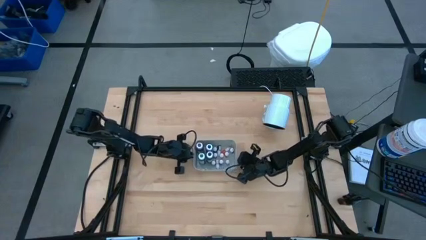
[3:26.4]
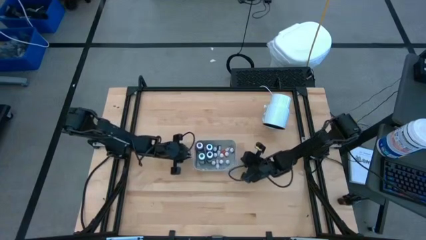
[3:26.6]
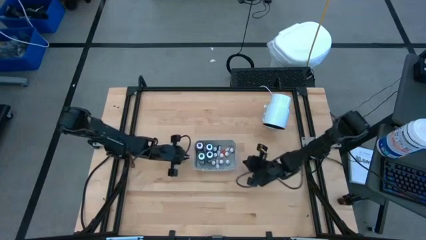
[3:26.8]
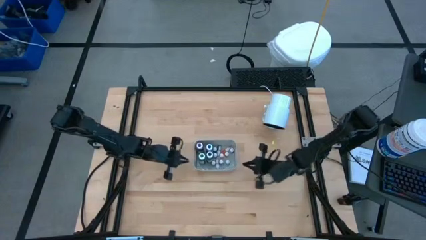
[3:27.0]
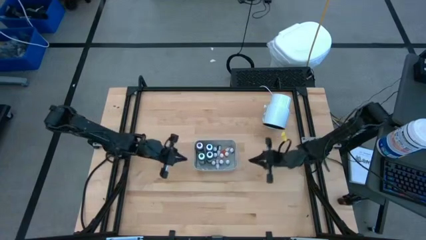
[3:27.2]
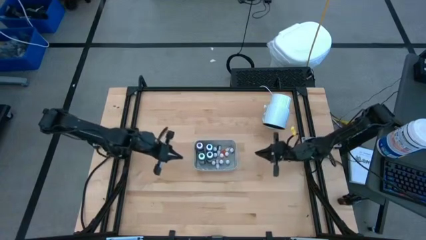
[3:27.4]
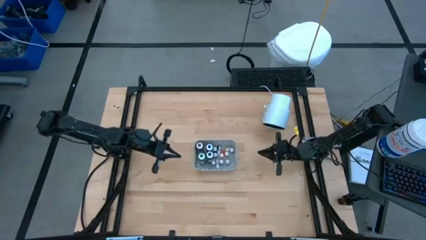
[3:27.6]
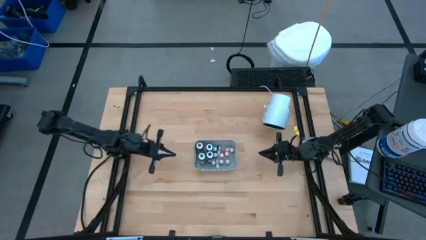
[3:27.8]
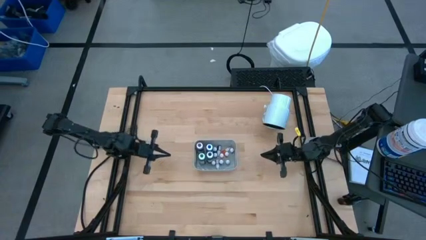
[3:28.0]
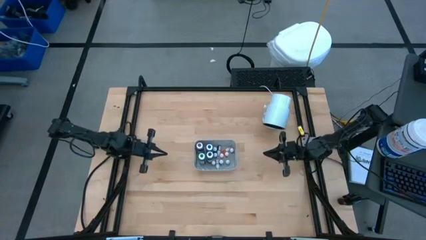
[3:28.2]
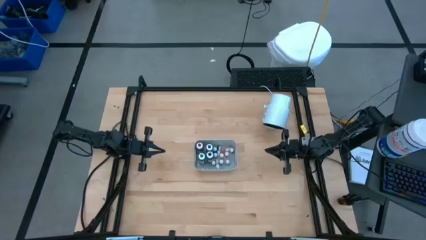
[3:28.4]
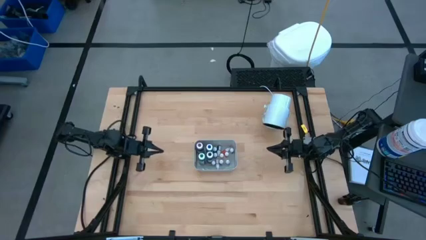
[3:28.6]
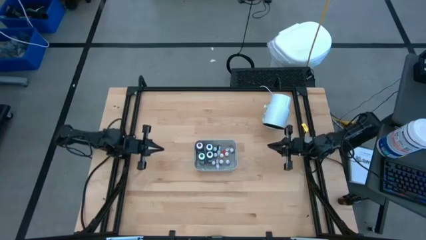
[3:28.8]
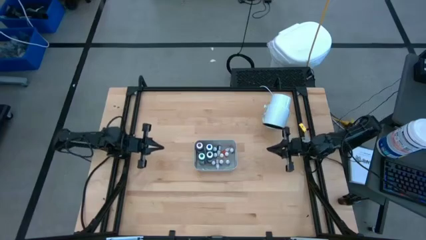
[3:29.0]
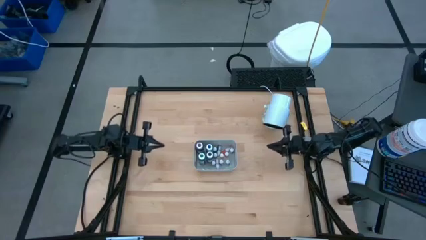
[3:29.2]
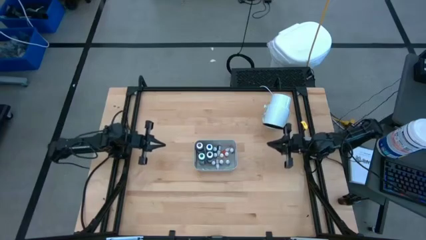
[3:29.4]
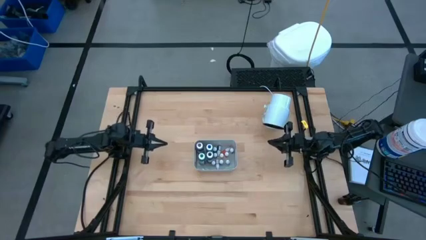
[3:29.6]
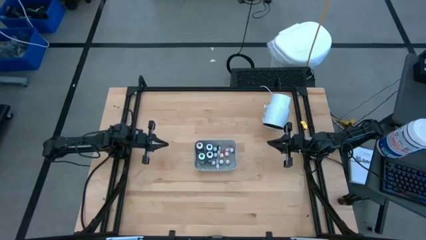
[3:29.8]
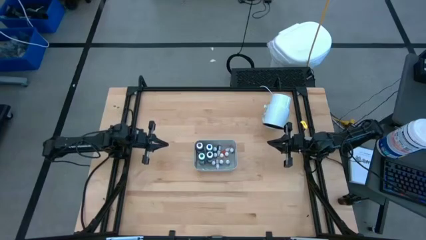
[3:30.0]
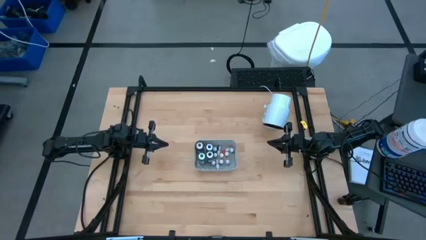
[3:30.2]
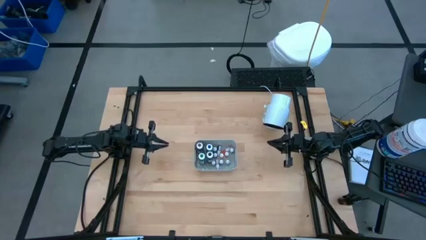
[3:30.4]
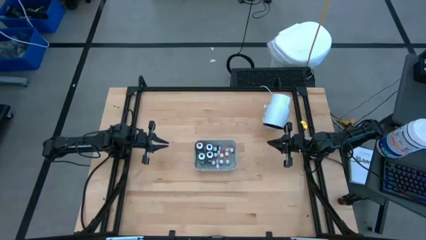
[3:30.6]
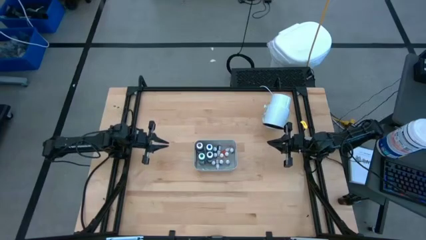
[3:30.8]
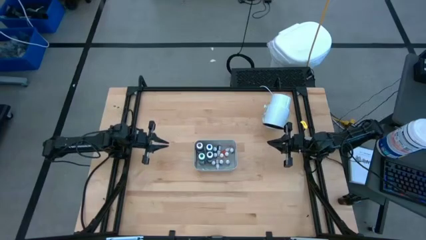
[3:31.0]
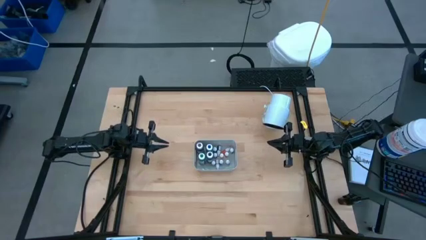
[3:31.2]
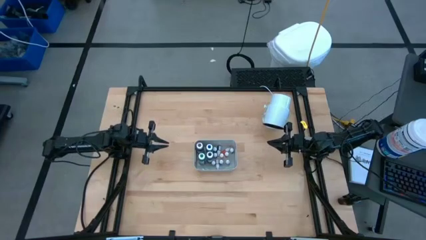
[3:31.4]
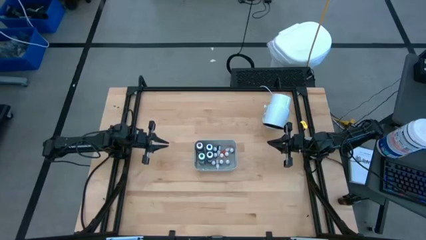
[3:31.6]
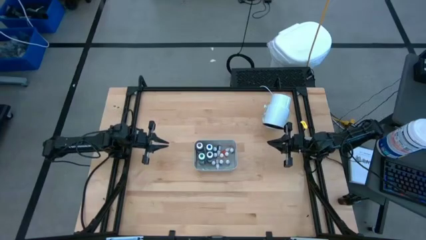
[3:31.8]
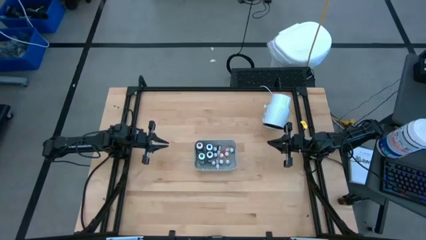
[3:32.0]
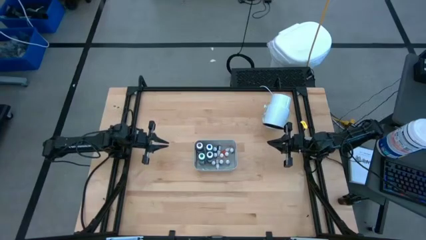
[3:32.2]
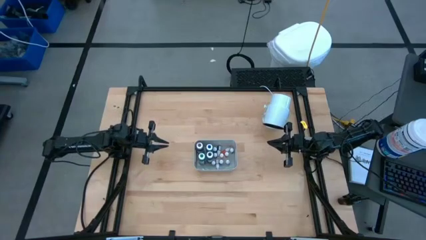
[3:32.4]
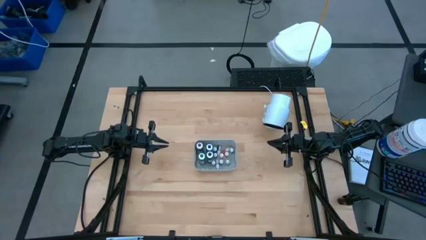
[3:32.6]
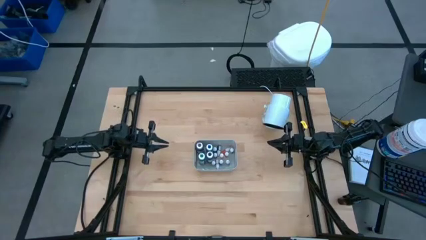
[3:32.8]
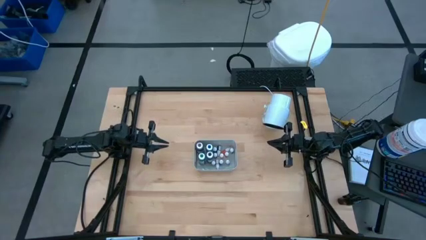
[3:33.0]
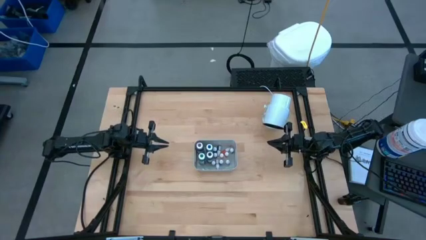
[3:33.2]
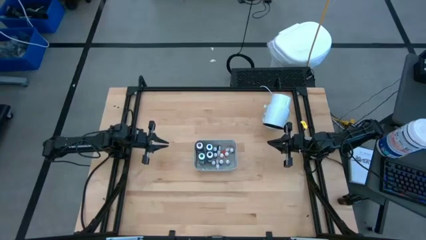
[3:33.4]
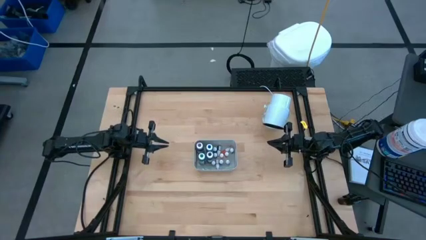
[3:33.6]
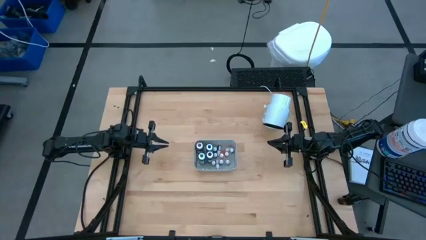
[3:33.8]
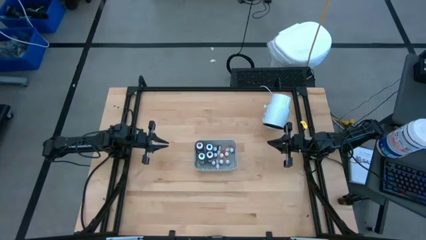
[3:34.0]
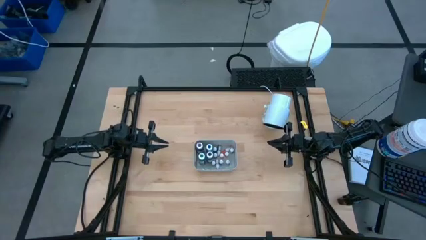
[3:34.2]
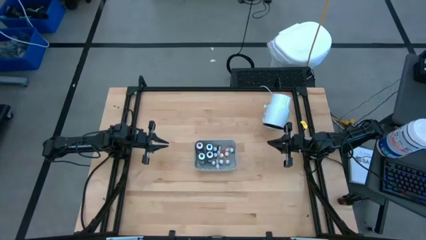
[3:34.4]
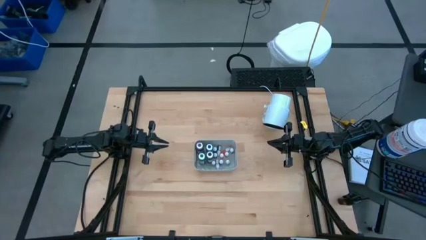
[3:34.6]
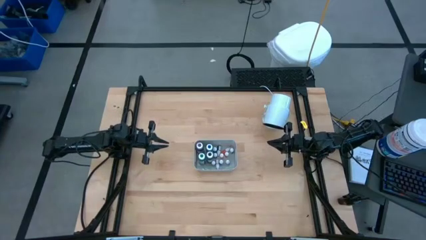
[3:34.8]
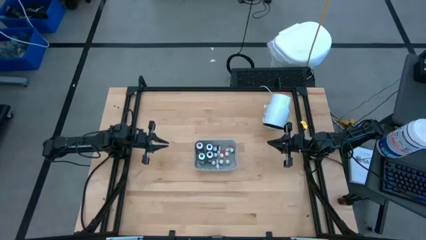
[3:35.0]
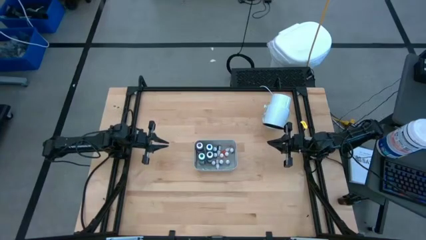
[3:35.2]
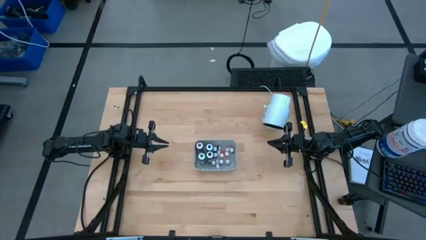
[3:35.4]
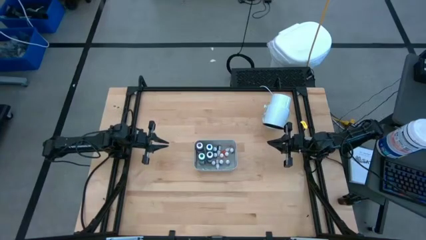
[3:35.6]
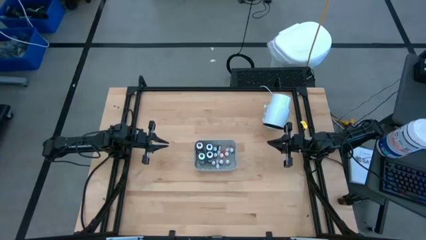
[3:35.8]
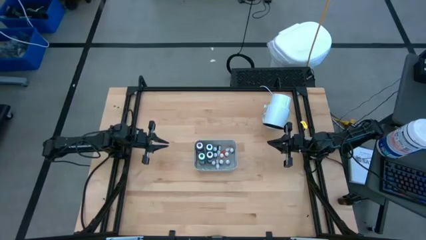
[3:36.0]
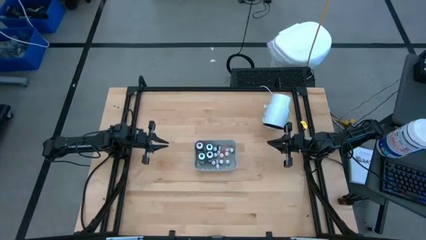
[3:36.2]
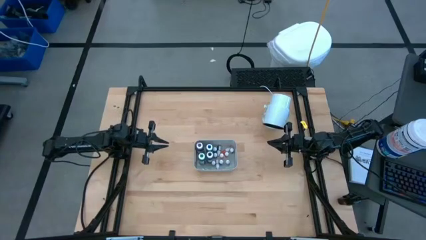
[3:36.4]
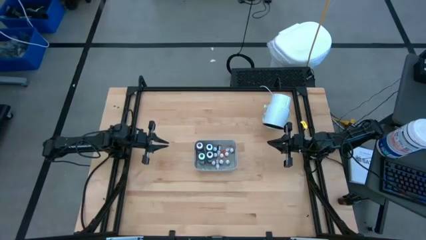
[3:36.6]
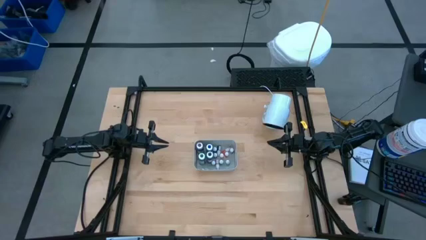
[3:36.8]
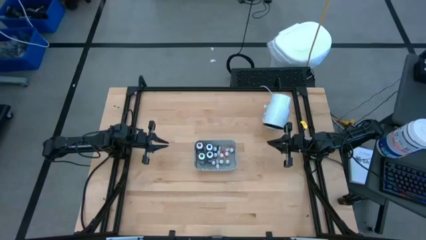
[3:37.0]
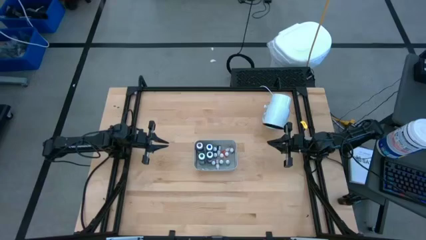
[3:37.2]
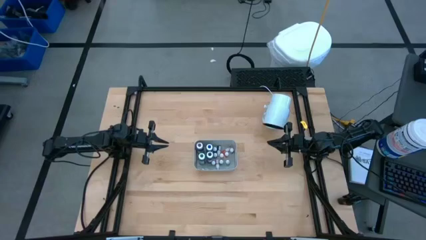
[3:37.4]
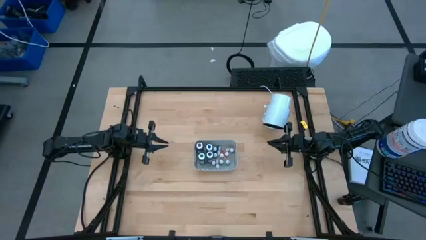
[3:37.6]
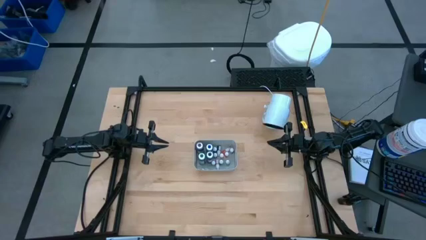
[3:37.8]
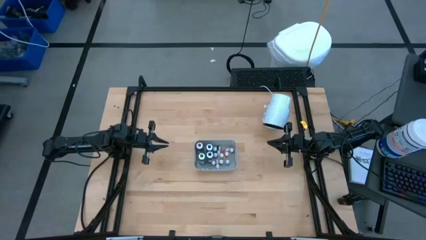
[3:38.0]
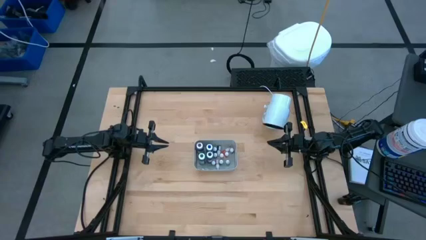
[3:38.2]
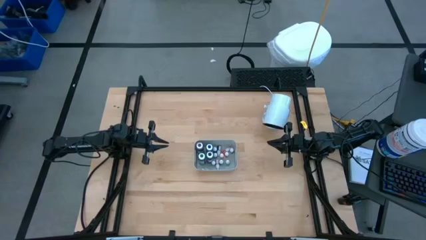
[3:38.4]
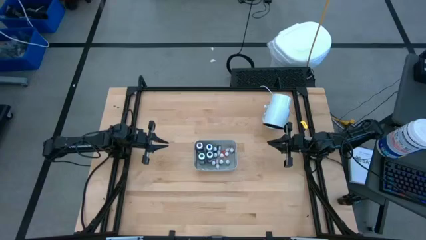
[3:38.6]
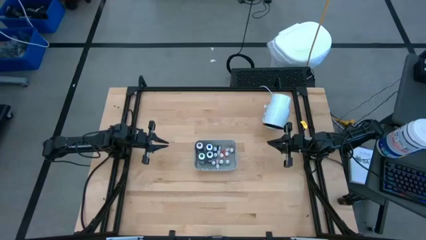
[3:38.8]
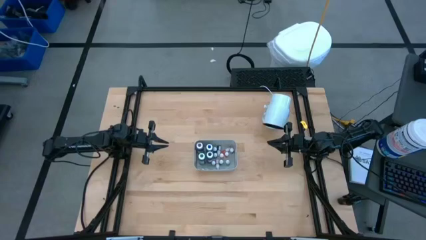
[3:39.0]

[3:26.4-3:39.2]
Task: Pick & Place food coloring
Return to Home Position

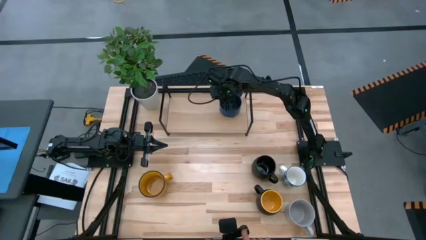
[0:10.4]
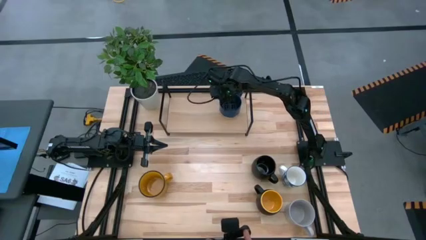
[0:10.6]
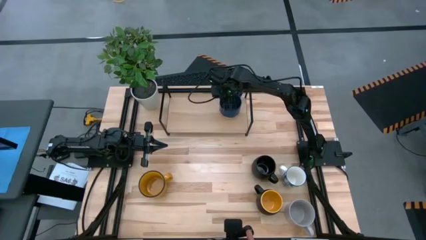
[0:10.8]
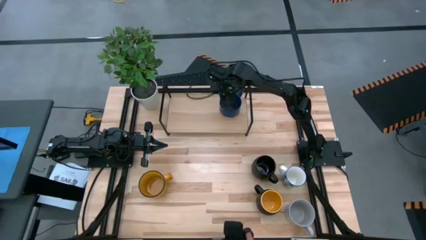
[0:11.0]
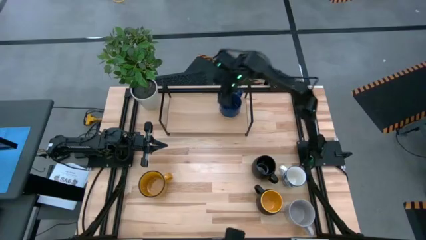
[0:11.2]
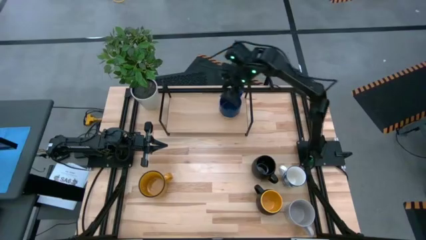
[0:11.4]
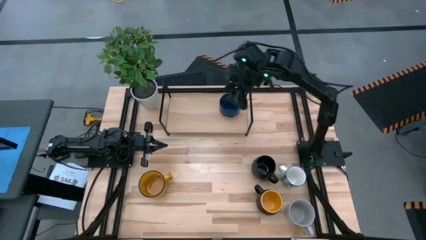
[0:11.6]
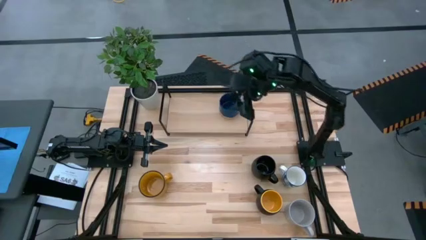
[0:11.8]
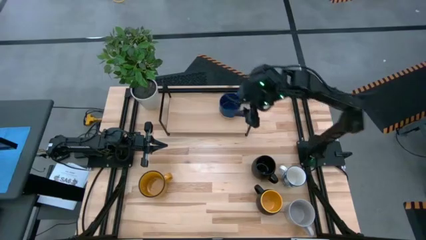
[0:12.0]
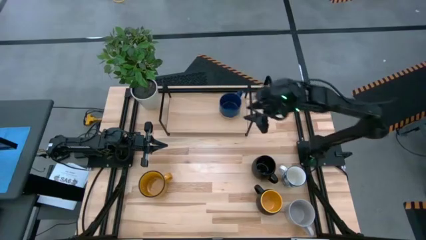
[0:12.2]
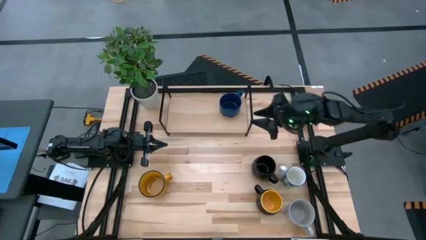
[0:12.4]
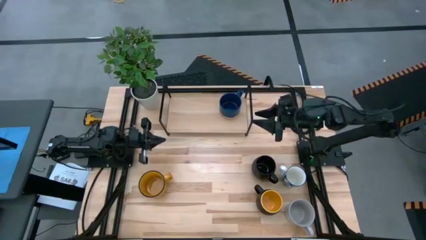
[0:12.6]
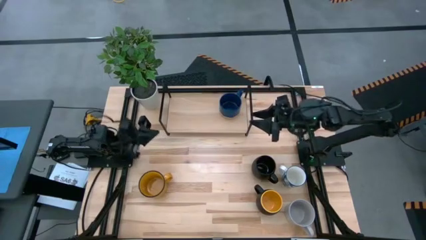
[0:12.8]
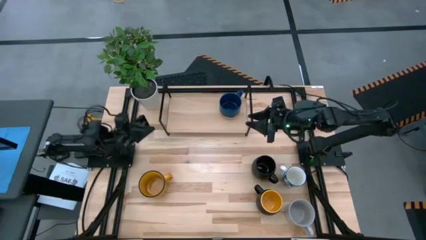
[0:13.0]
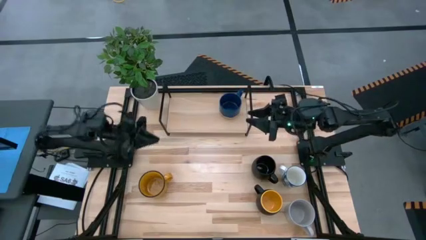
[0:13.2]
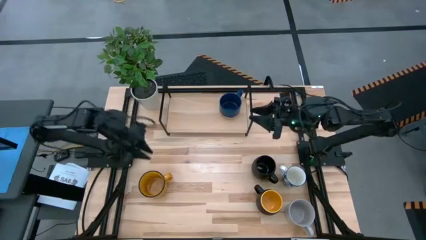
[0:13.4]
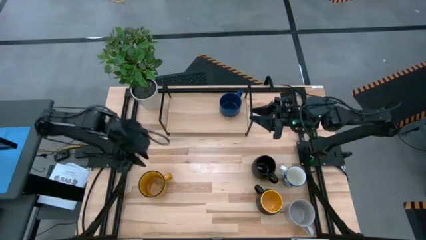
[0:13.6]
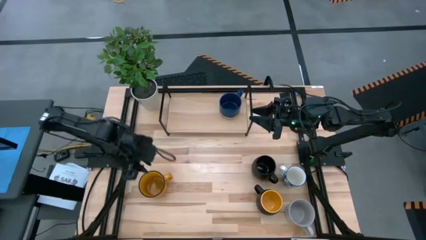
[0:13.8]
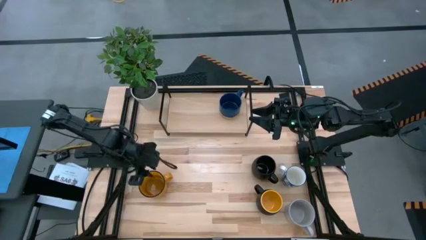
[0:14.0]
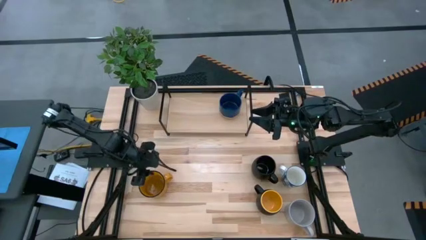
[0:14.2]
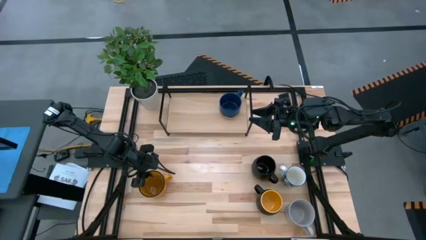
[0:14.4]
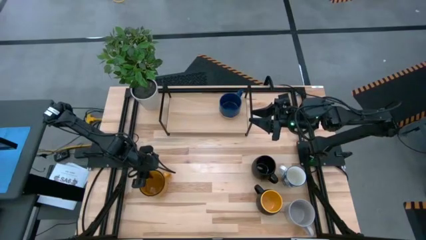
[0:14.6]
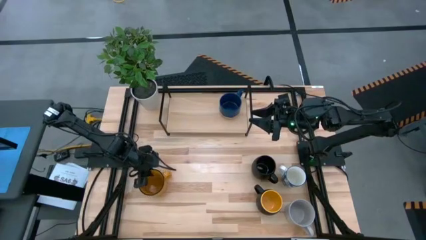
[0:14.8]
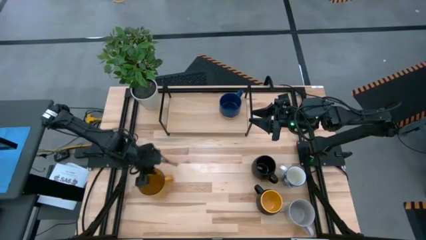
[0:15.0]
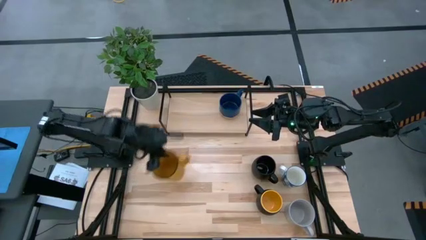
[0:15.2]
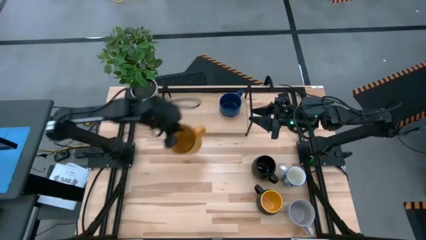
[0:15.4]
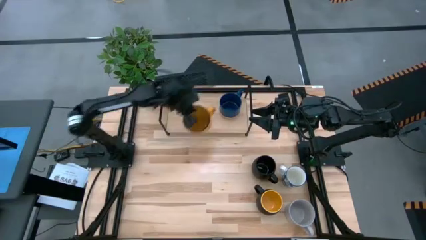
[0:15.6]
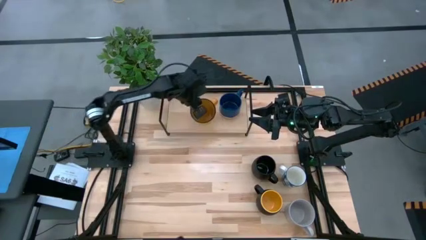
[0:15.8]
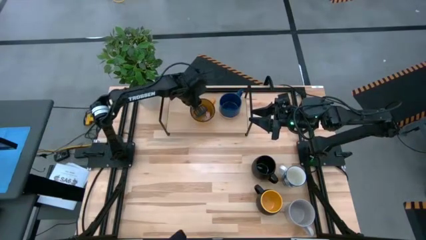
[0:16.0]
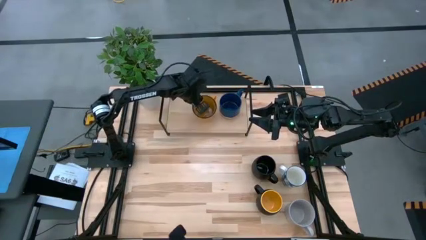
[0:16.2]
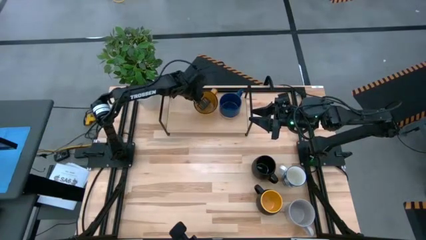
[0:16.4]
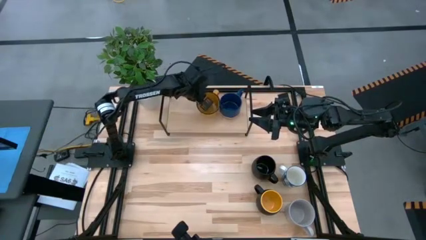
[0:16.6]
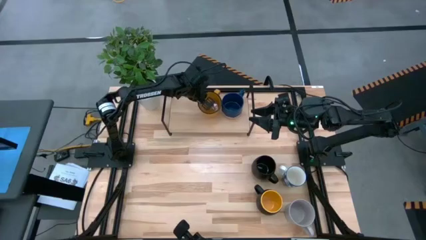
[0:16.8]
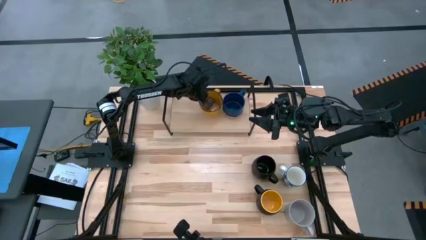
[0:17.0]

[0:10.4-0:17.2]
Task: Place coffee mugs
Put the yellow mug on the shelf
